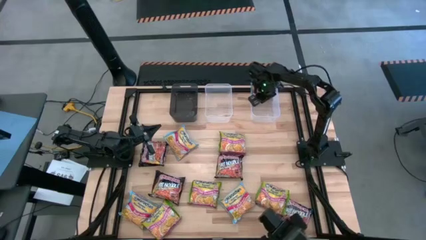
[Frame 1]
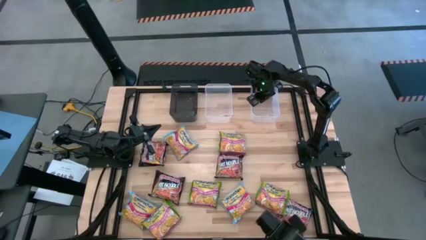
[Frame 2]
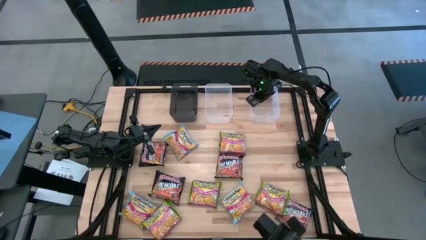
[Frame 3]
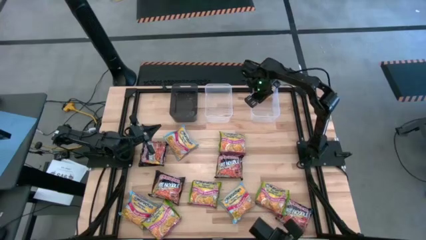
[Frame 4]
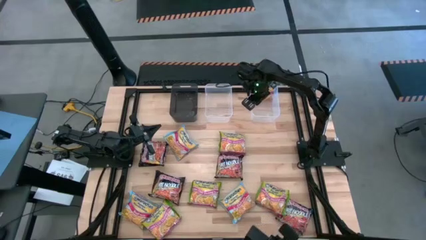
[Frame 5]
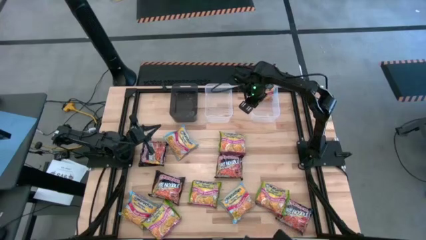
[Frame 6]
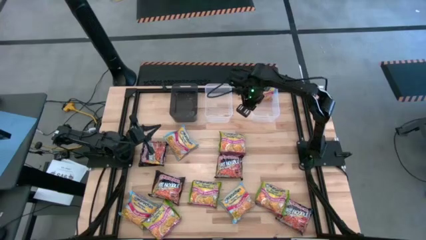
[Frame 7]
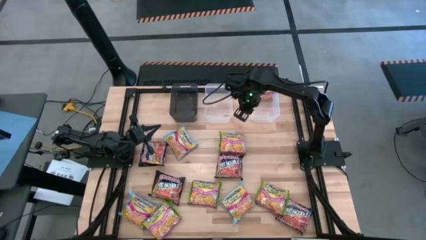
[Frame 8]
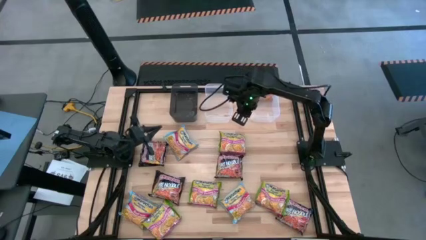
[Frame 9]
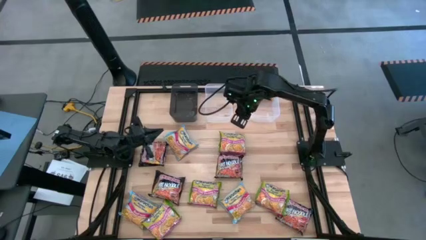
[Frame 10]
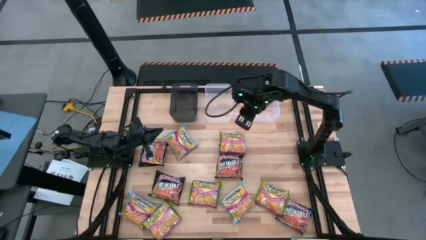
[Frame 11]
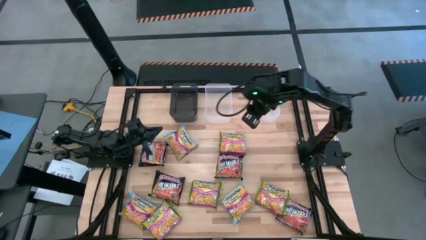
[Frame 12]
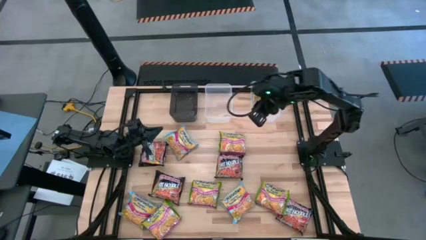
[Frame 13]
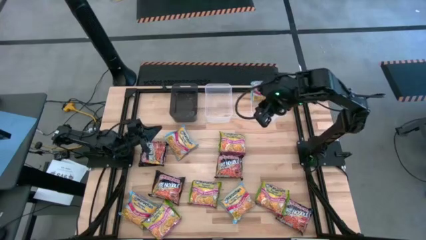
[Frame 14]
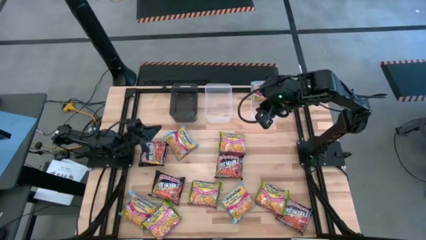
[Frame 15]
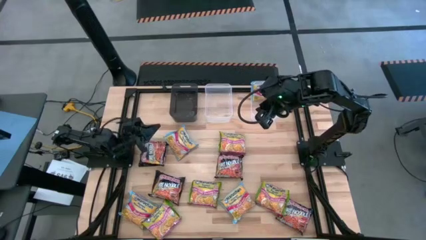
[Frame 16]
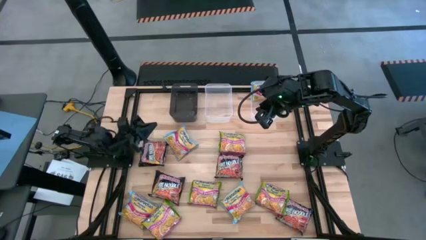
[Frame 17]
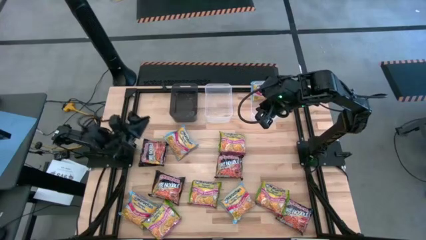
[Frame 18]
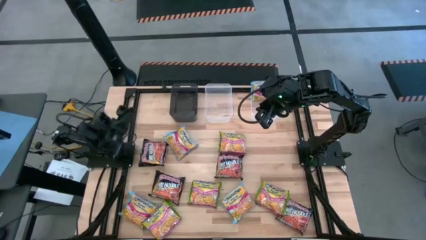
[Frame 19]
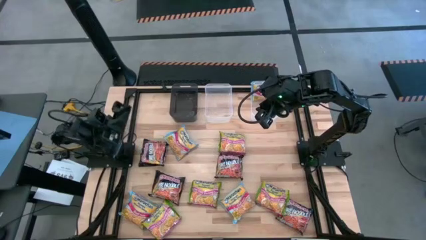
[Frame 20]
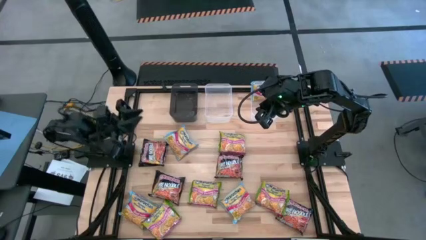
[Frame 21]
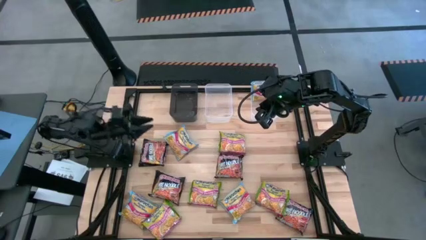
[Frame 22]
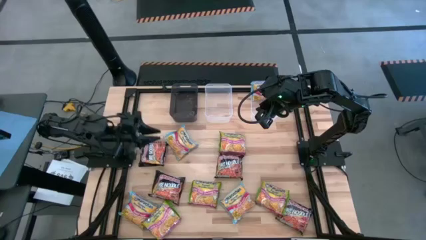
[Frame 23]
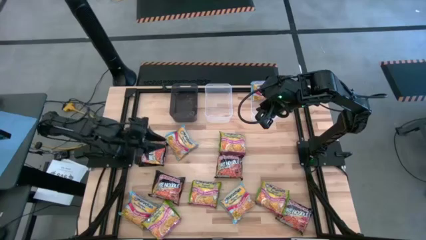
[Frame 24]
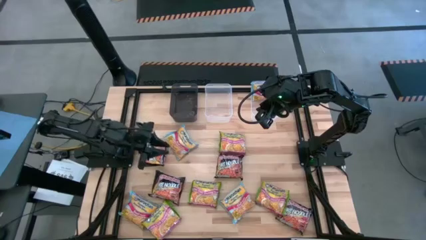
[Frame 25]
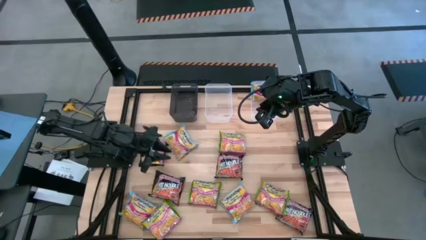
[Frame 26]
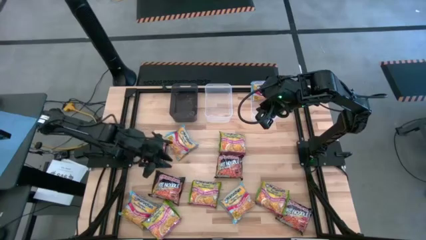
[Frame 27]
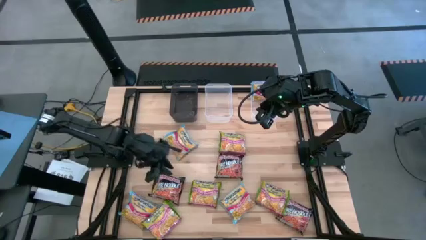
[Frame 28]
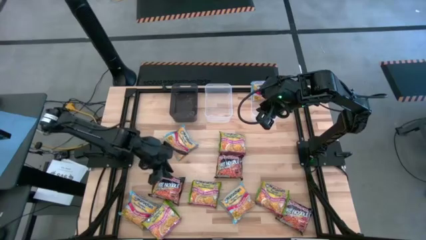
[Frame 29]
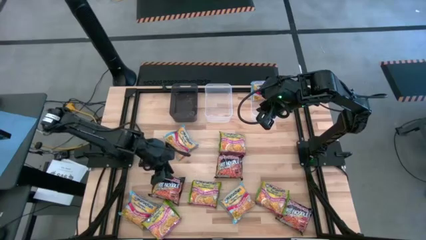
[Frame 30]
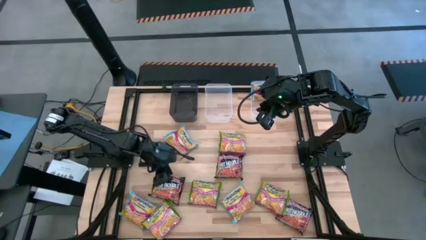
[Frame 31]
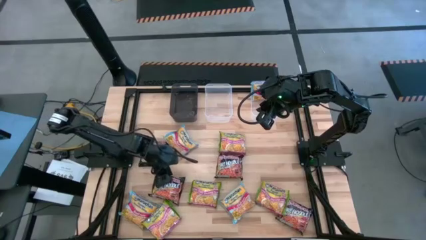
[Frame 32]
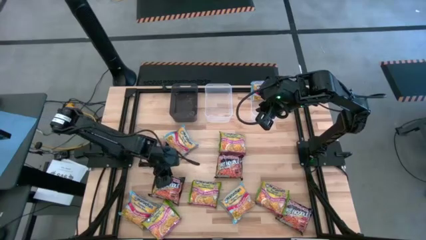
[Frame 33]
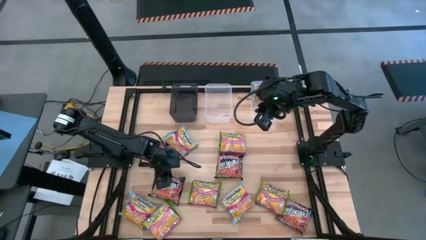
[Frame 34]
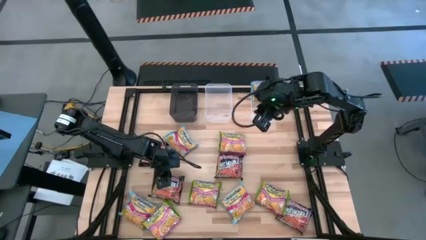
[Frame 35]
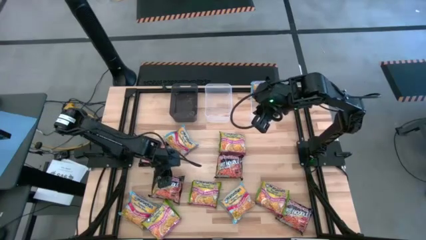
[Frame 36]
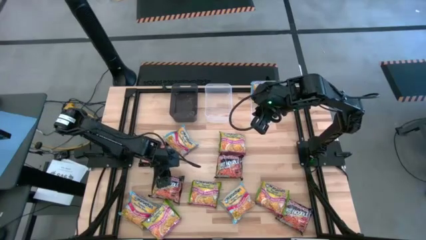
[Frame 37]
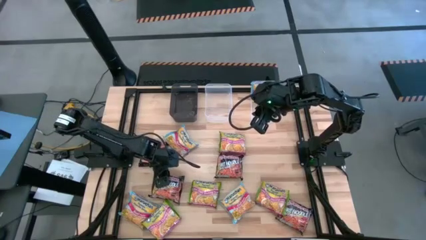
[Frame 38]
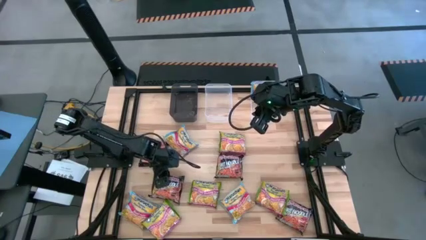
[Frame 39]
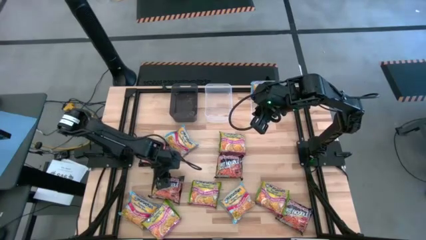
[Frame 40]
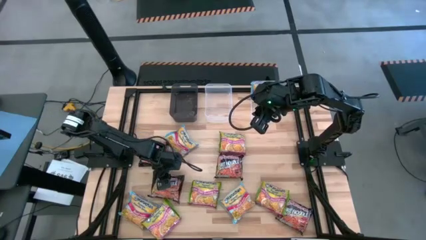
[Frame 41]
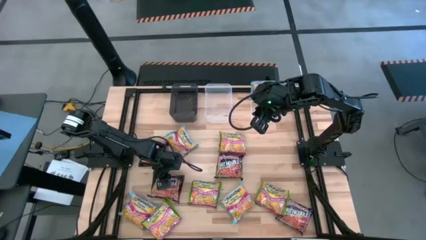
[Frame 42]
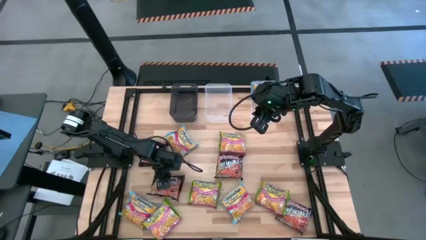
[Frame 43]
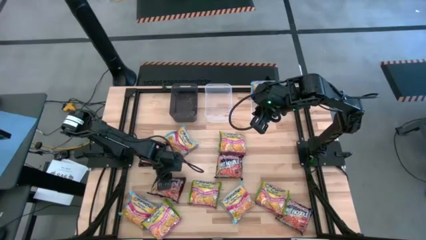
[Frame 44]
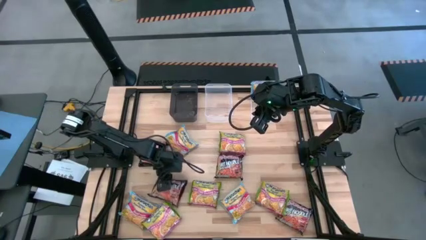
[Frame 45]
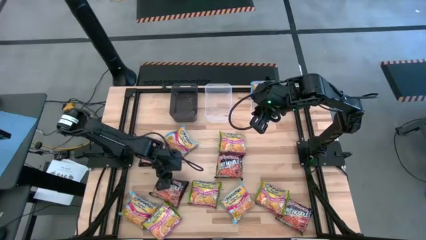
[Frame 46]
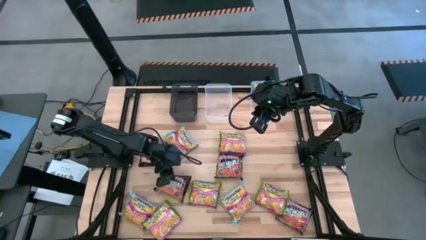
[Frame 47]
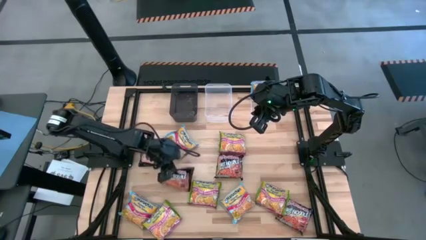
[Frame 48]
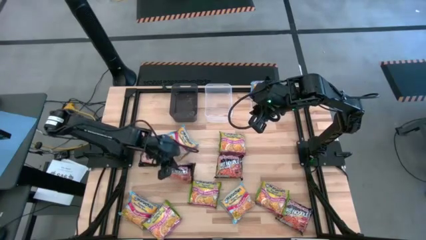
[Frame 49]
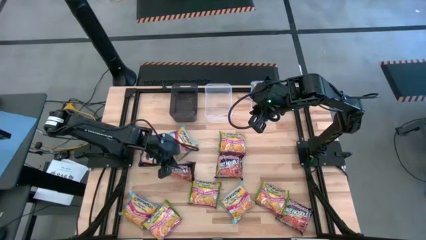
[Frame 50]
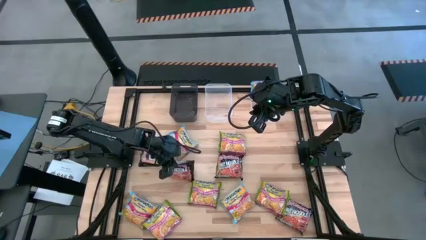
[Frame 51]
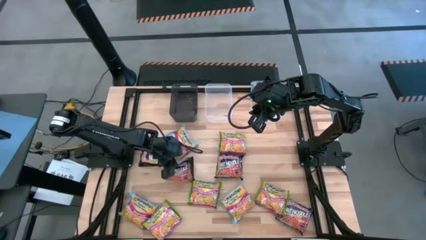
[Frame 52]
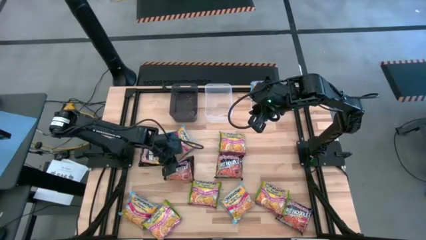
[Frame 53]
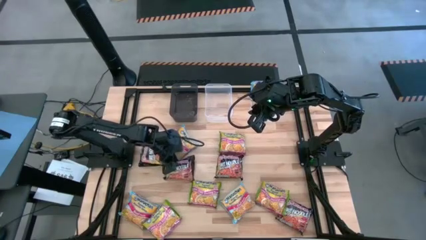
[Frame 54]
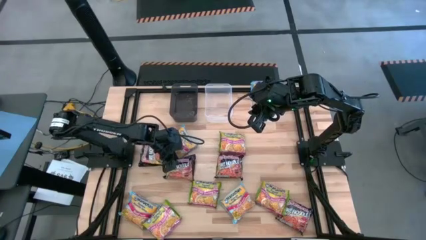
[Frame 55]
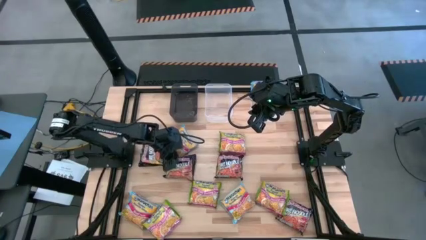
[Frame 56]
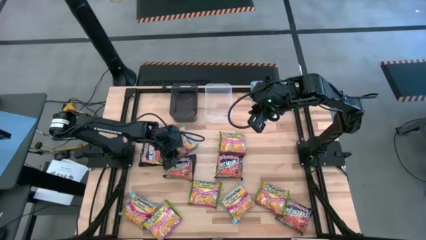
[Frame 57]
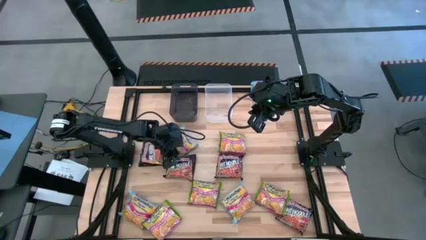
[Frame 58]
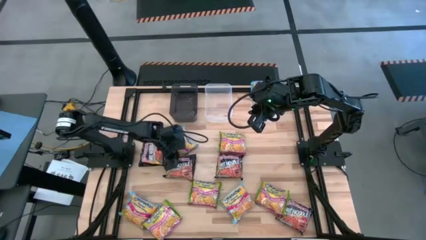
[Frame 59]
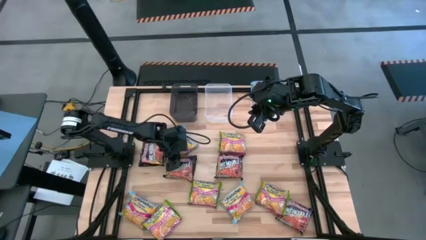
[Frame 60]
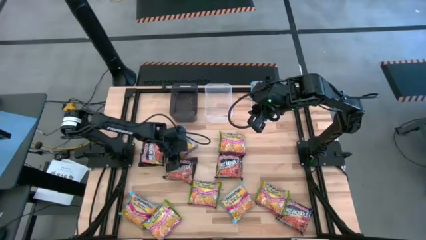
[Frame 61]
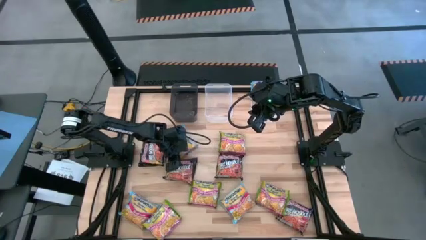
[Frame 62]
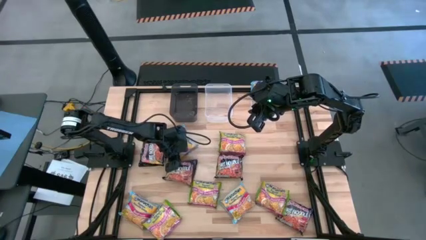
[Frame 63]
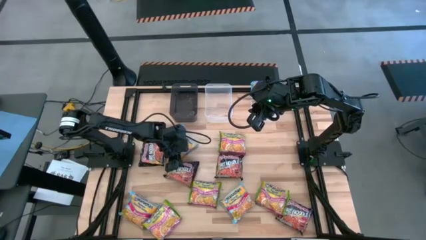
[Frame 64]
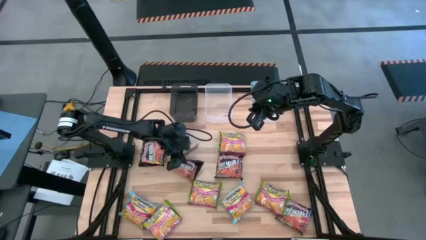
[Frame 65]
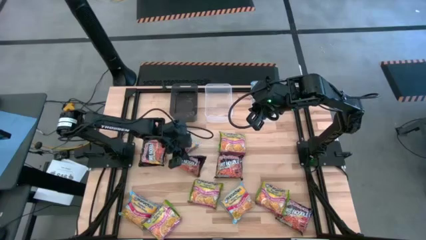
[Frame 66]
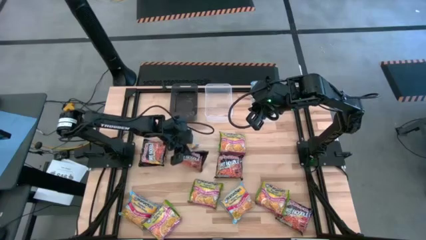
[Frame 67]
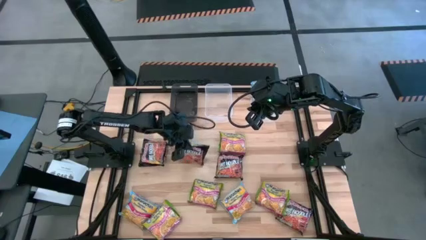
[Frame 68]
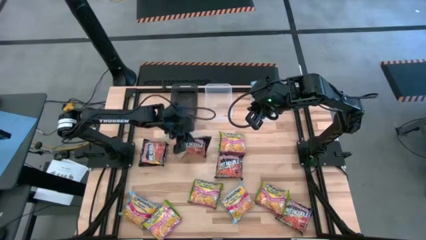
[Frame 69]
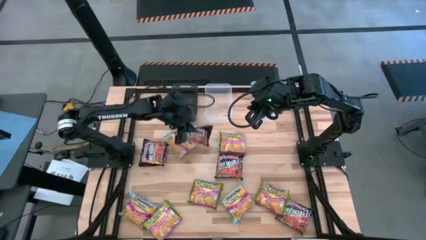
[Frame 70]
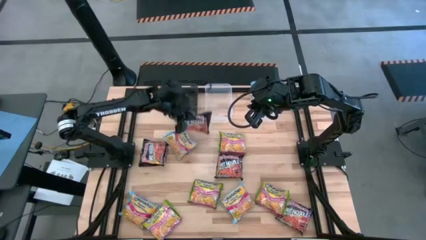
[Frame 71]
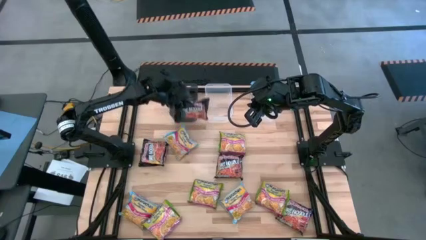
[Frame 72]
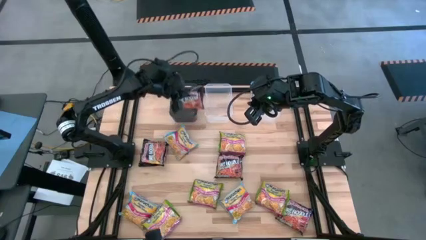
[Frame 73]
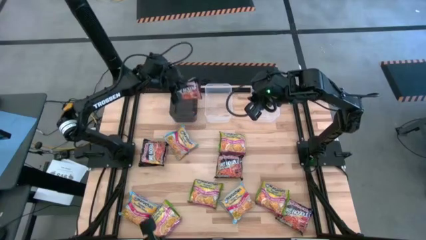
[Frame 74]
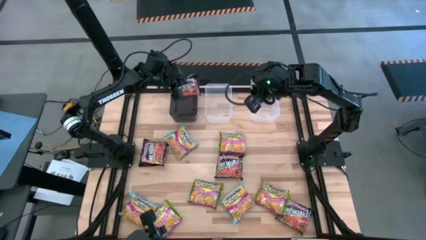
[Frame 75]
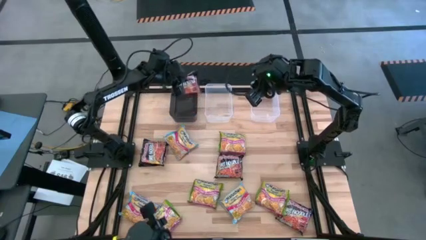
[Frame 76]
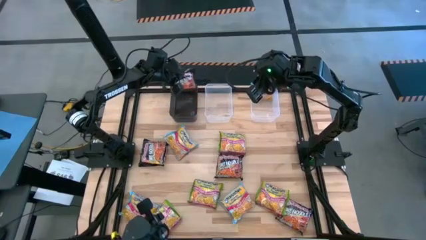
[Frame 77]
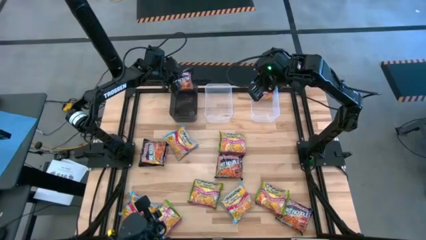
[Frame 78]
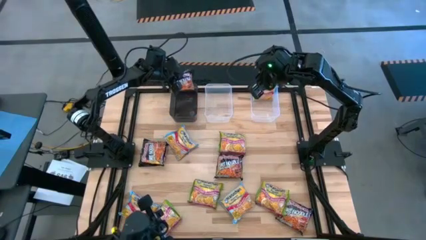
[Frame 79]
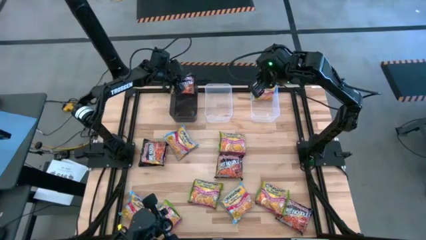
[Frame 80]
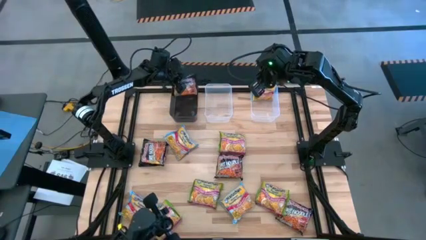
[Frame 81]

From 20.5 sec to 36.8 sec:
Task: Sort Maruchan noodles
Put the black noodle pack into the black bin

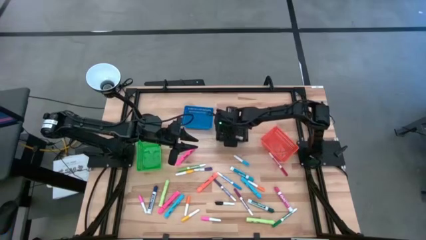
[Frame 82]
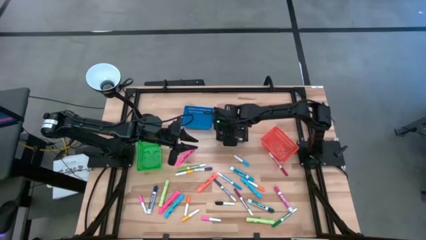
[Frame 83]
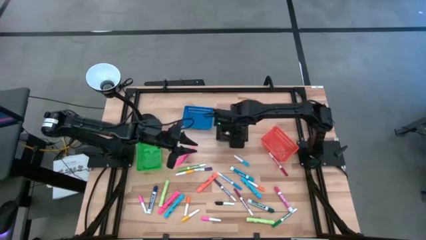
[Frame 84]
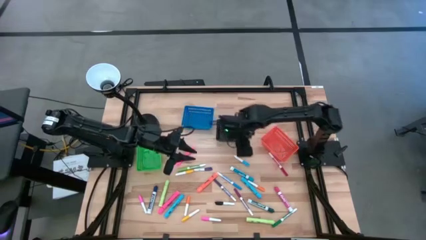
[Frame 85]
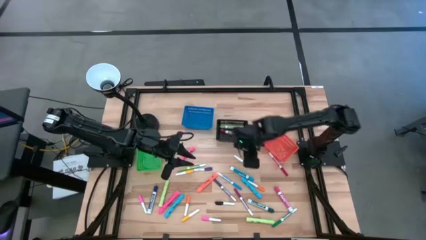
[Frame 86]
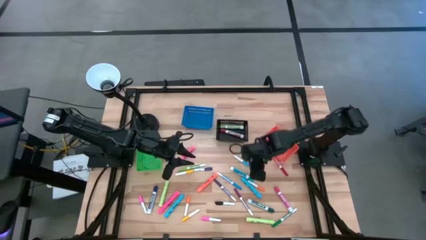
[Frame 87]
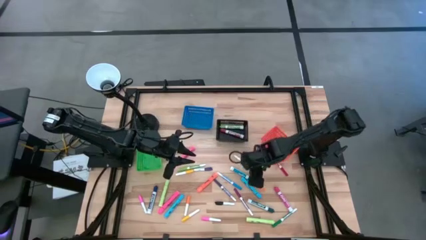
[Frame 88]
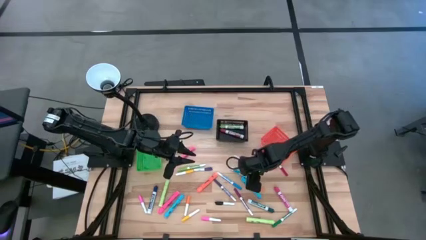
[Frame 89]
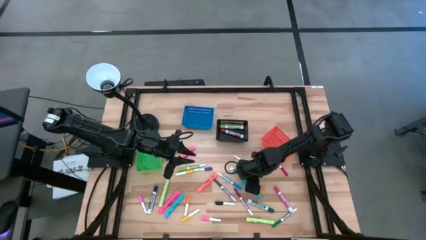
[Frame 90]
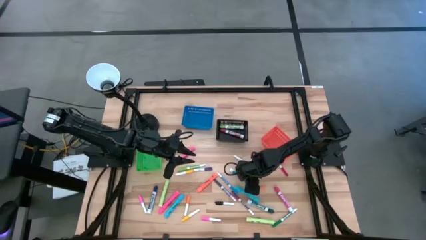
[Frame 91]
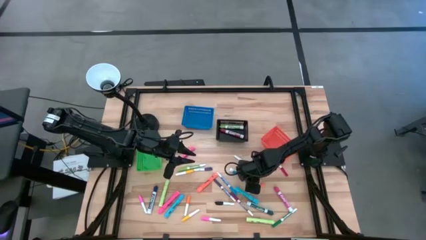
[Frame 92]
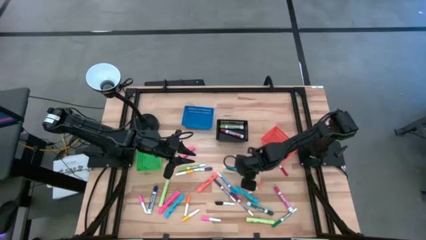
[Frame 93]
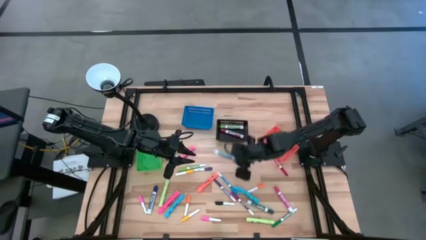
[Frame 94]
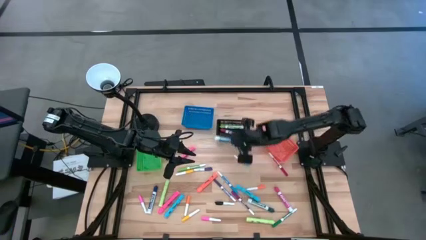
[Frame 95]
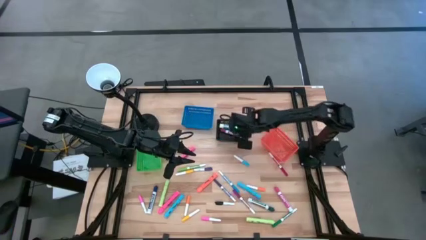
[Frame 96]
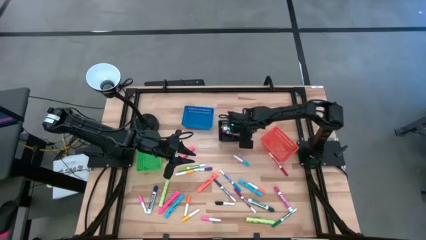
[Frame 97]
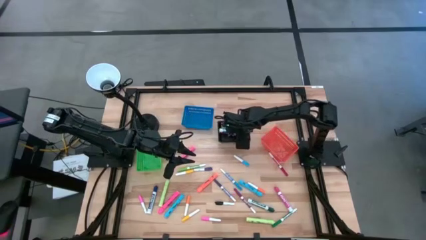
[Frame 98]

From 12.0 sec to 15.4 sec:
Task: Pick & Place Markers
Put the blue marker pen into the black basket
